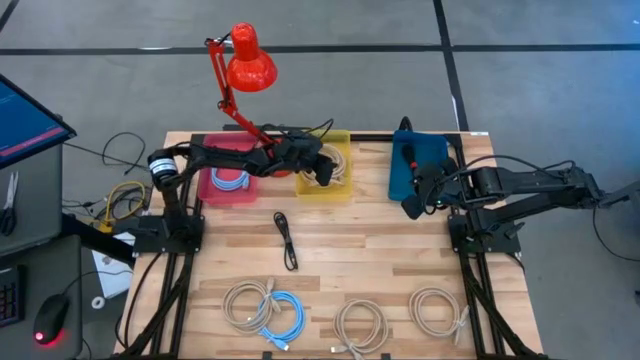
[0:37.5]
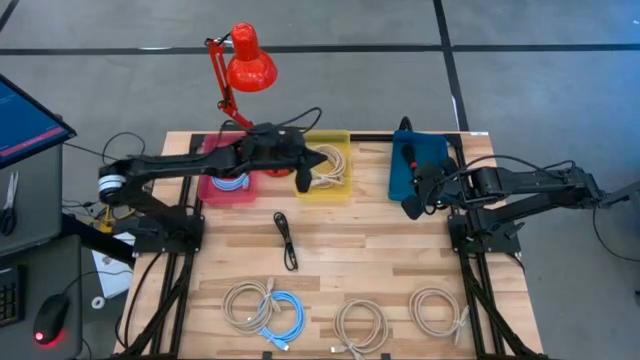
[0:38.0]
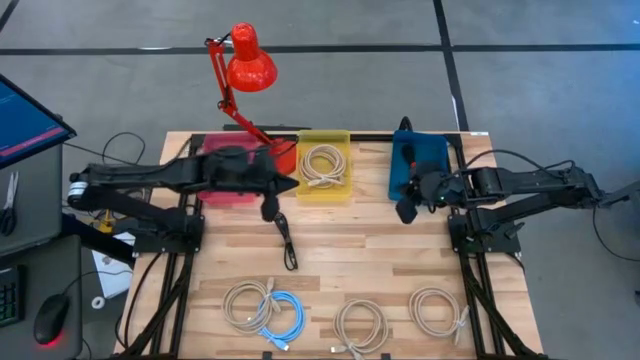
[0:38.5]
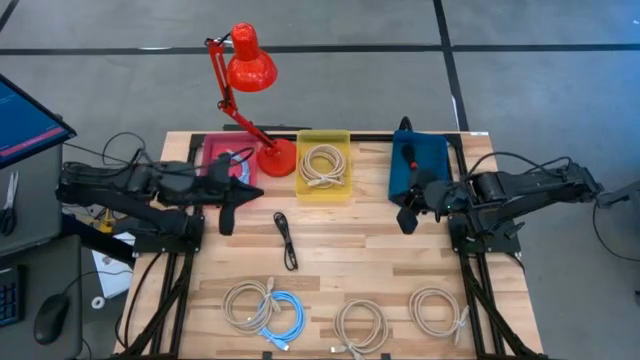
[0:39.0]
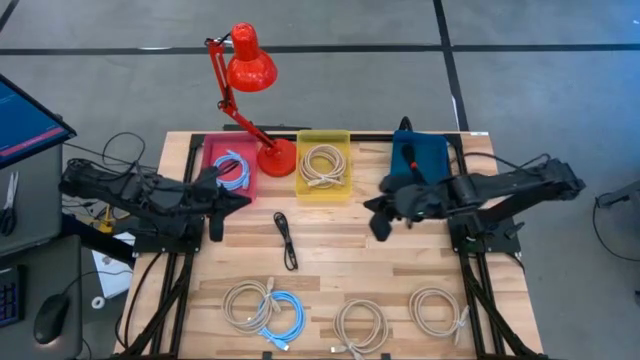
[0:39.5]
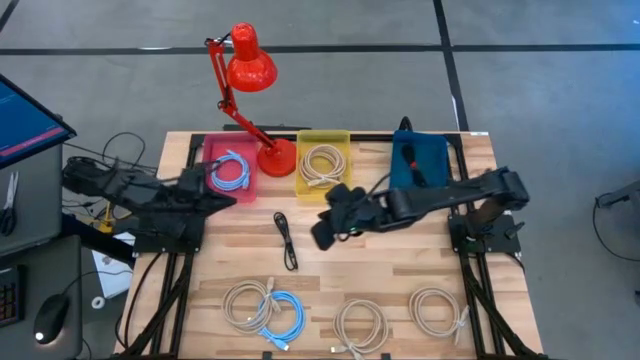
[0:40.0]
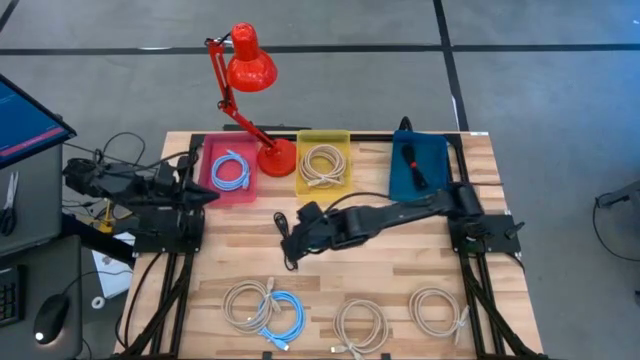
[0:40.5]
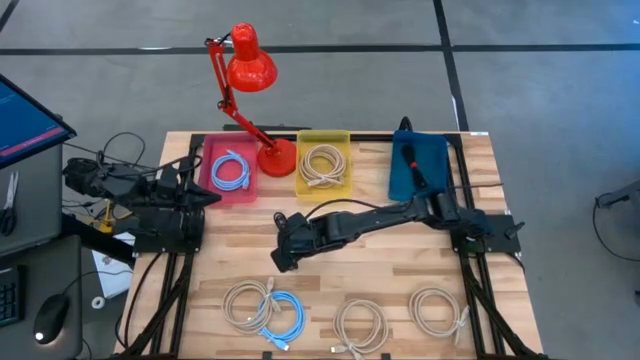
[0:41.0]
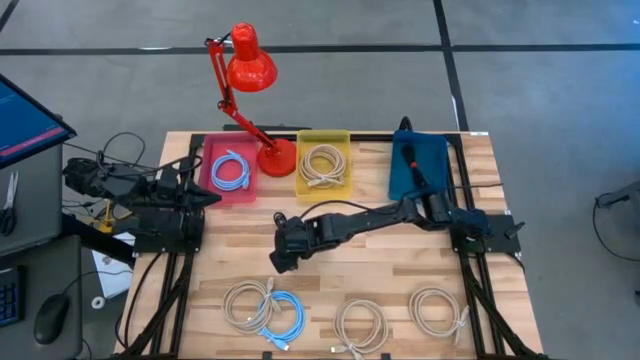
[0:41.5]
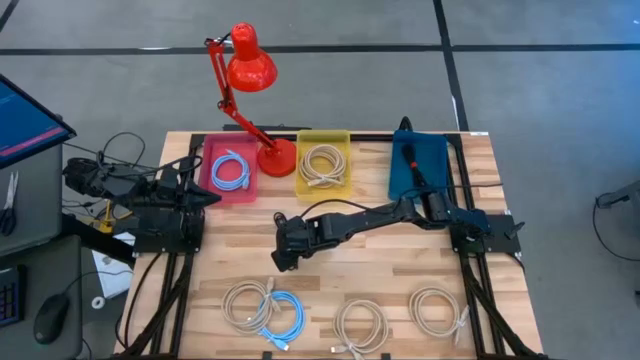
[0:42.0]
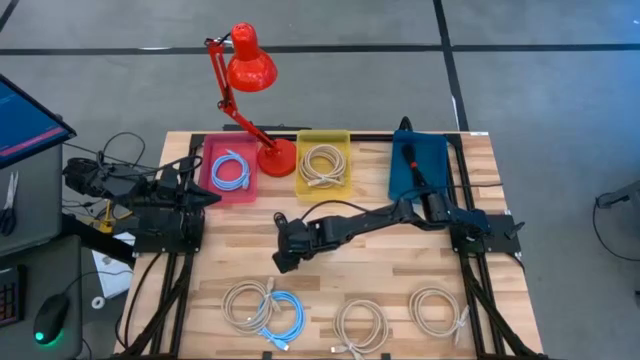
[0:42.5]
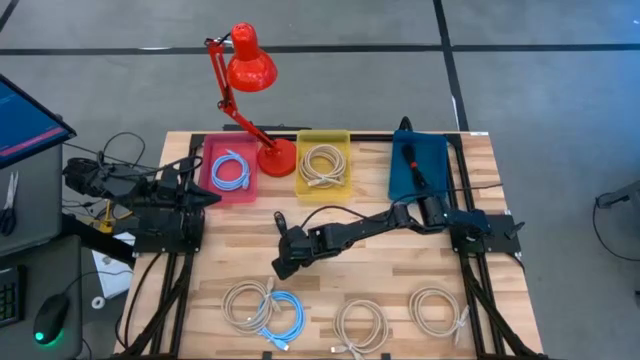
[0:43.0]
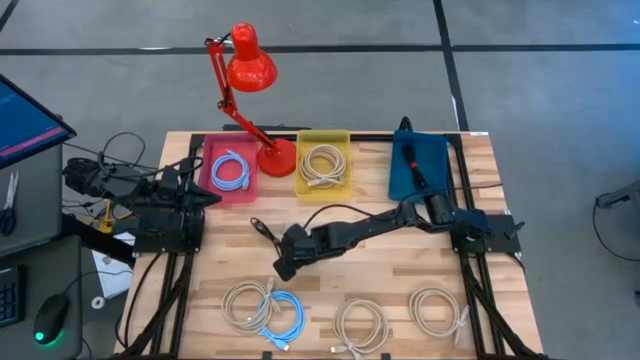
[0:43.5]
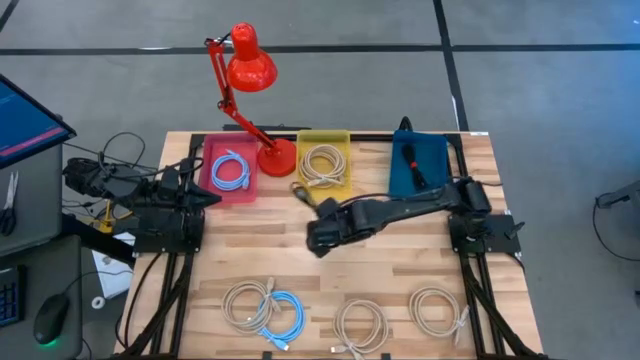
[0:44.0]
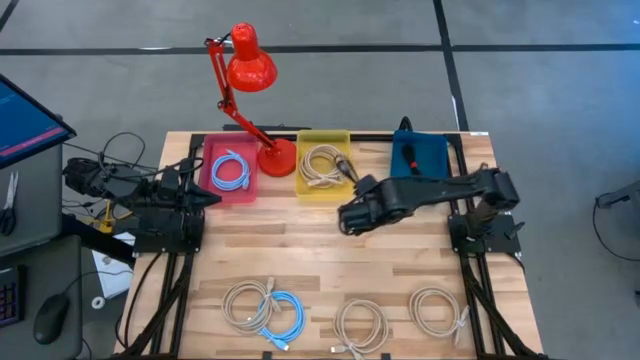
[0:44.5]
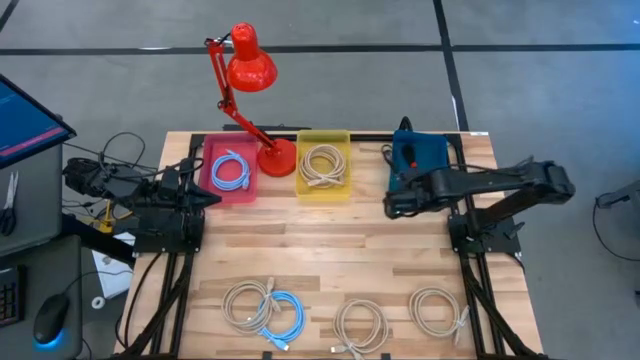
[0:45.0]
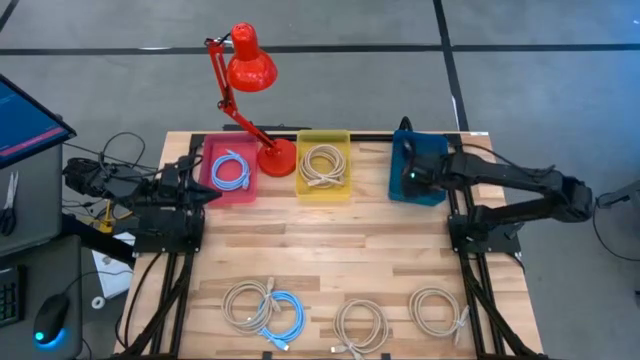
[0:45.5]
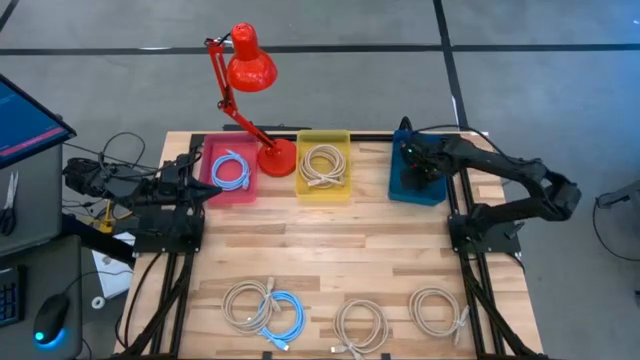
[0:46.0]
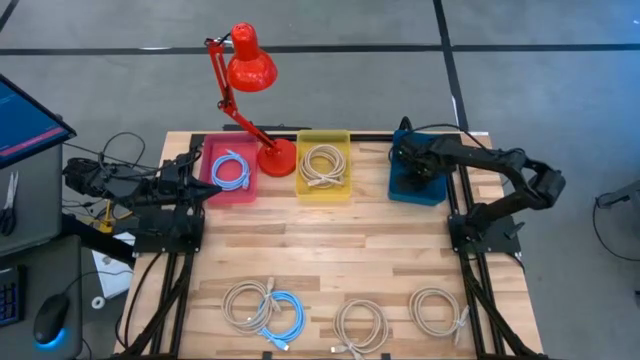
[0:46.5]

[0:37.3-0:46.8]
Task: Sort HDMI cables
Put the black HDMI cable into the blue bin

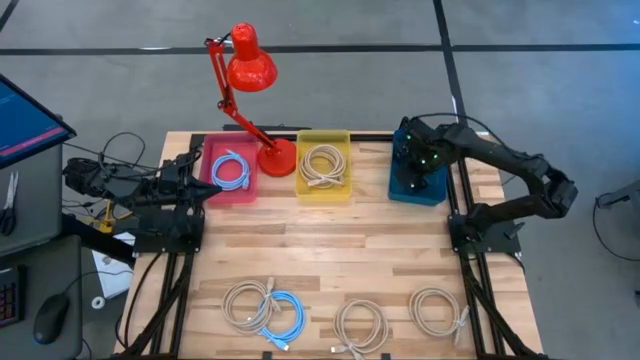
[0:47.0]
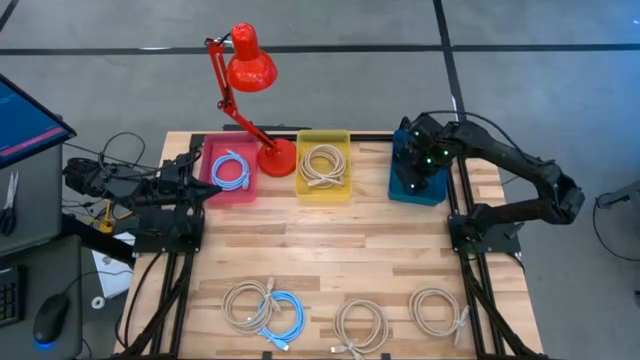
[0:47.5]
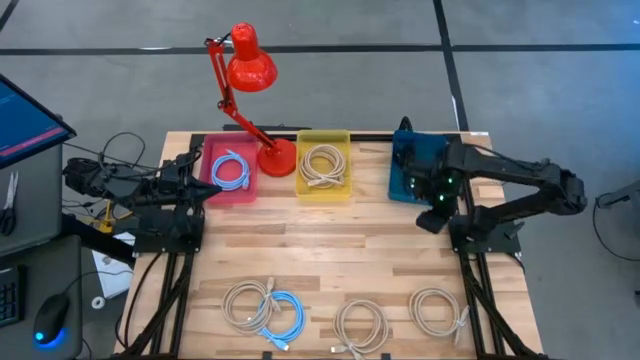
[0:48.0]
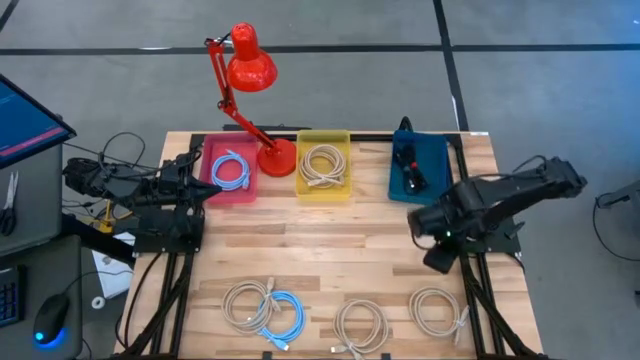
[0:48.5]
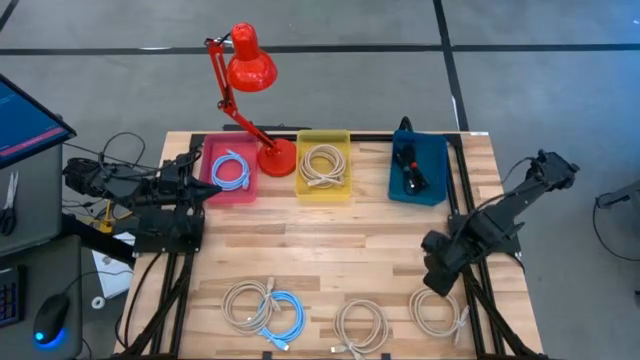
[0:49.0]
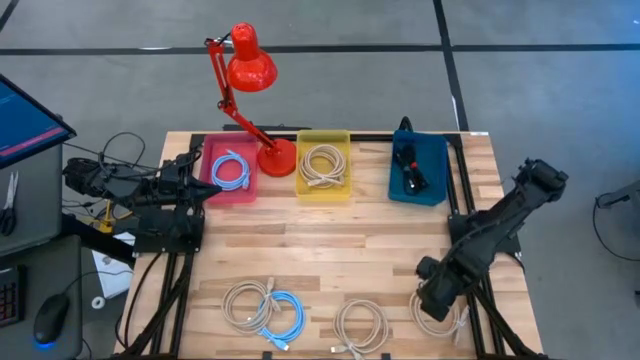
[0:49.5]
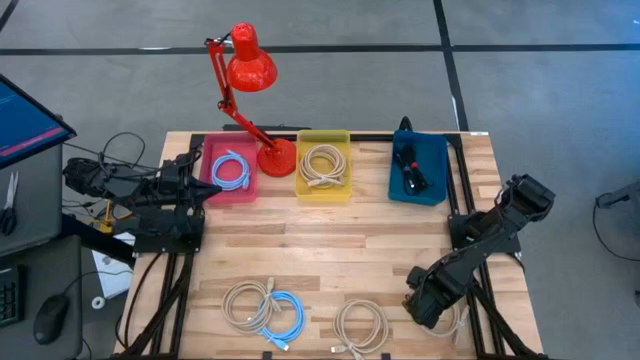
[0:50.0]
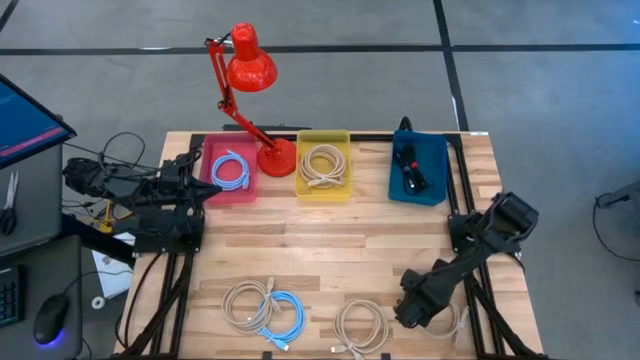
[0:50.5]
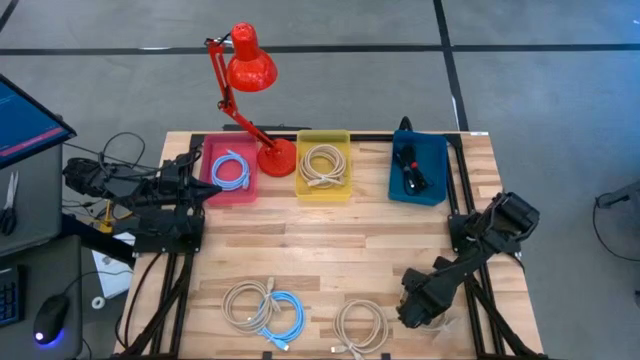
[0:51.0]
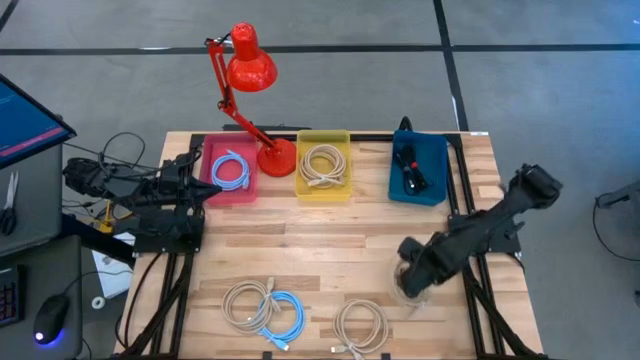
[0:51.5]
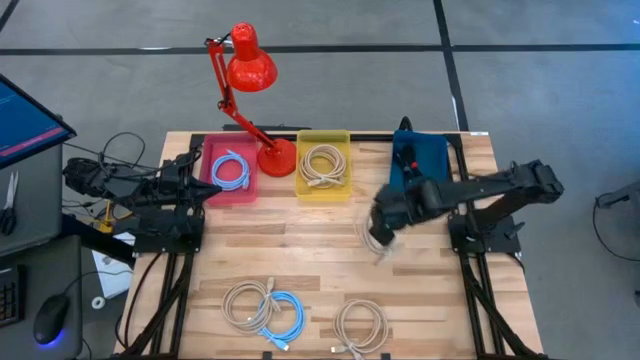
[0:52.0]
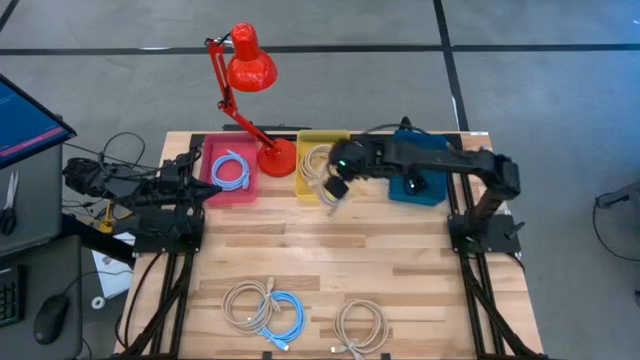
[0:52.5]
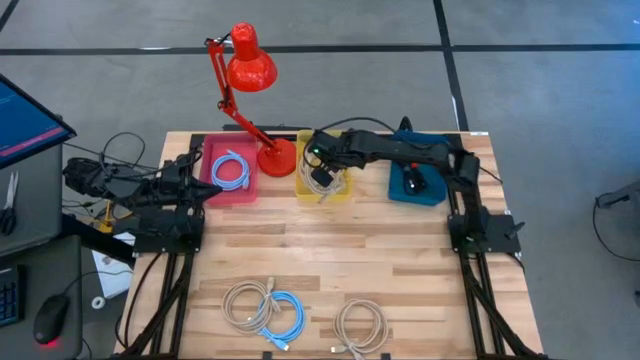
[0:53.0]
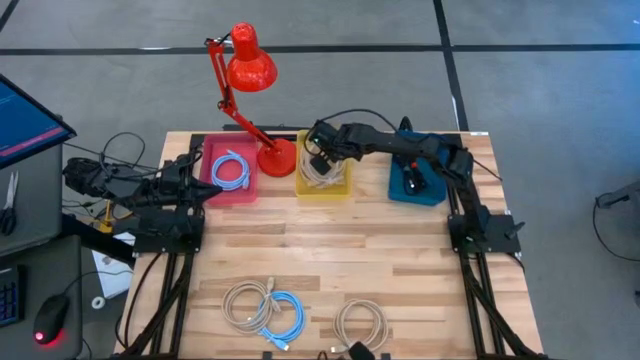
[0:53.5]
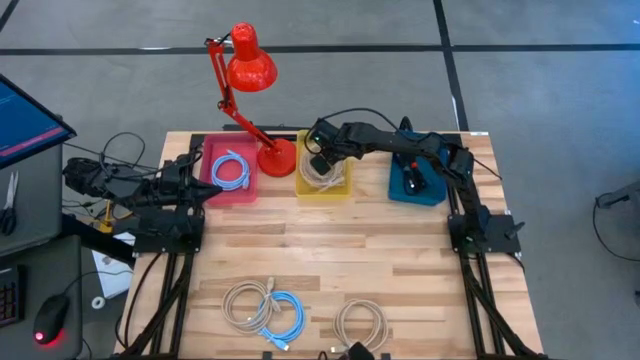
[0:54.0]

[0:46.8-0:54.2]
Put the light brown HDMI cable into the yellow bin
